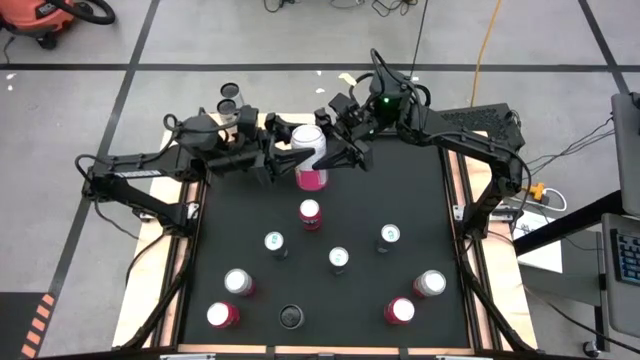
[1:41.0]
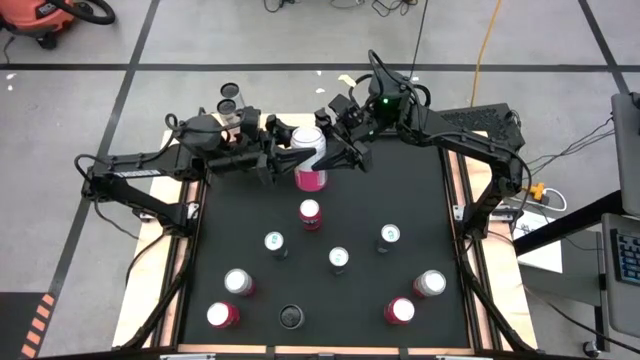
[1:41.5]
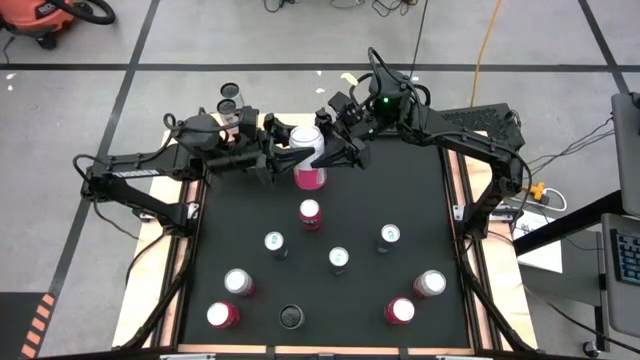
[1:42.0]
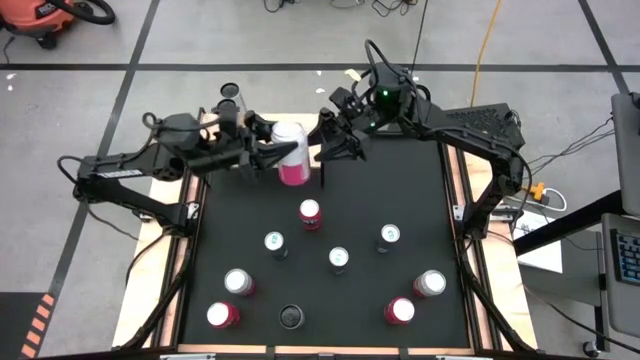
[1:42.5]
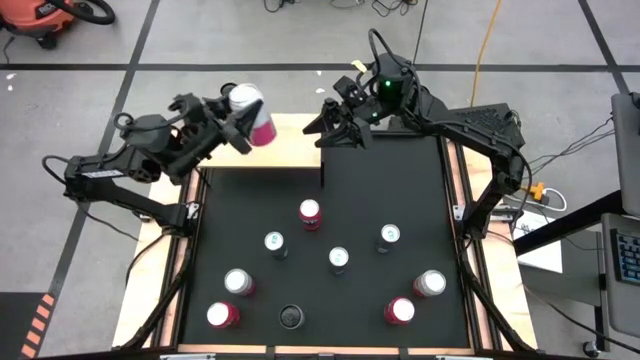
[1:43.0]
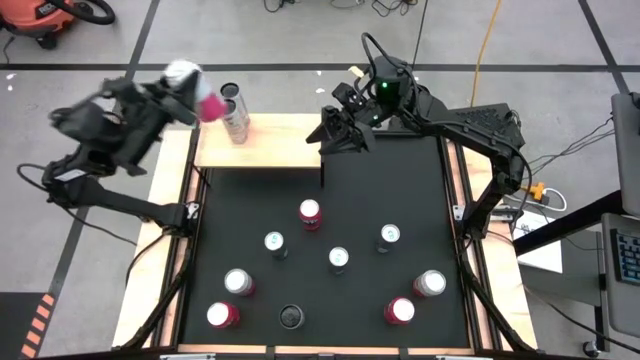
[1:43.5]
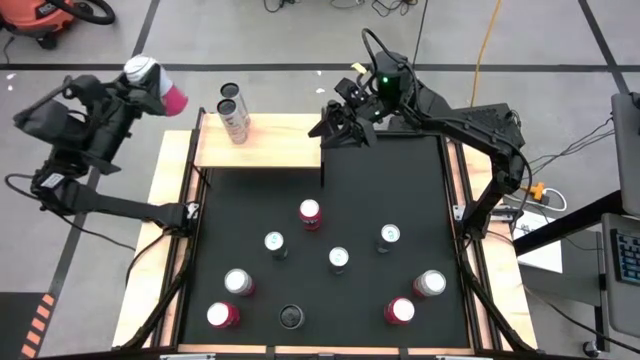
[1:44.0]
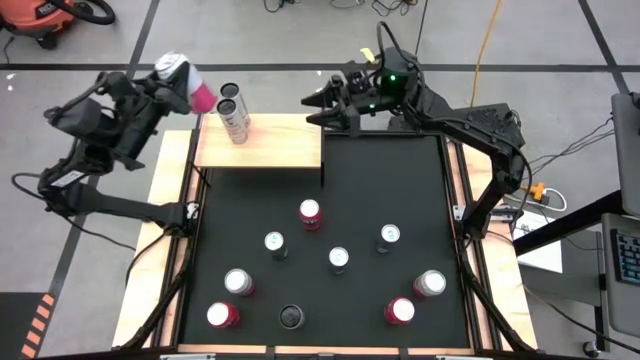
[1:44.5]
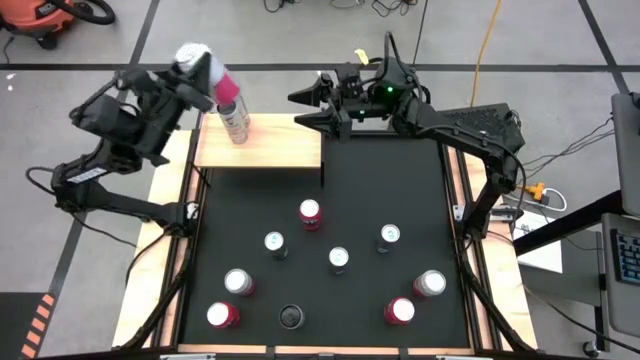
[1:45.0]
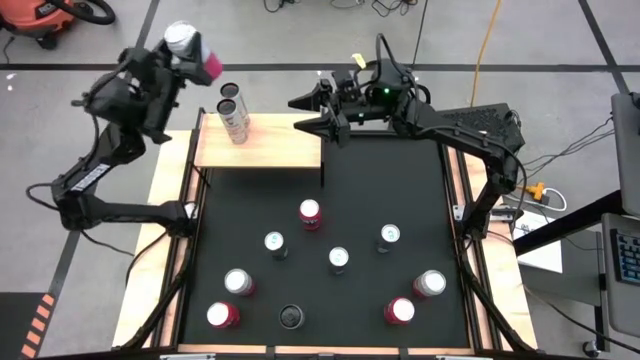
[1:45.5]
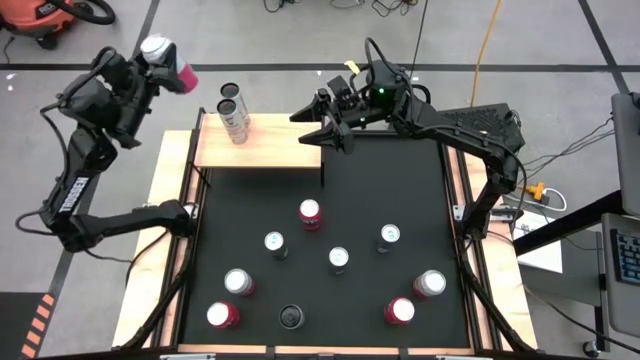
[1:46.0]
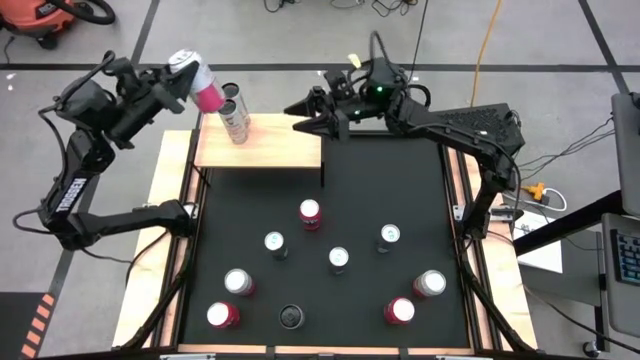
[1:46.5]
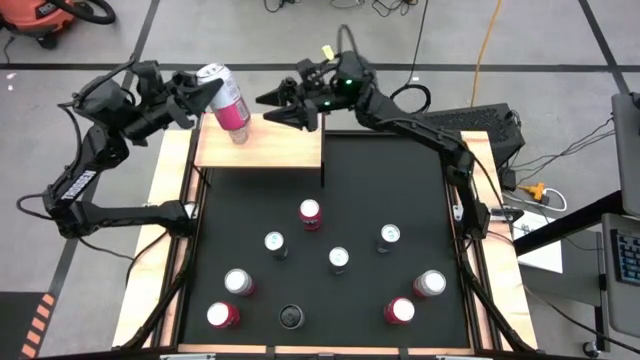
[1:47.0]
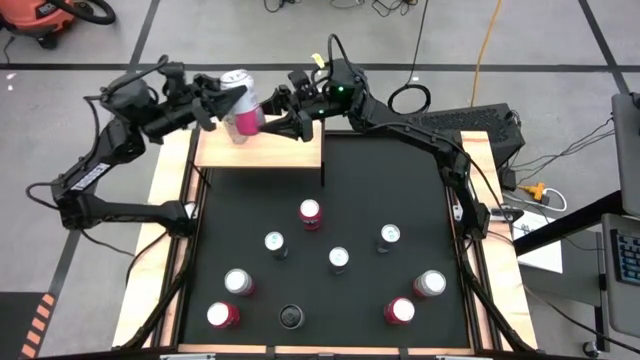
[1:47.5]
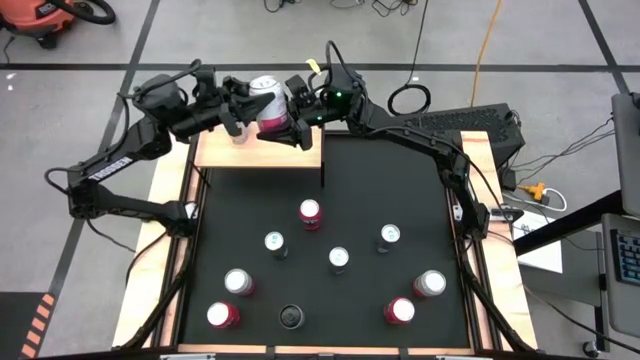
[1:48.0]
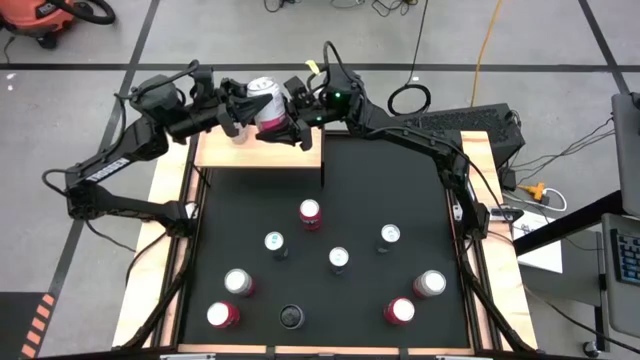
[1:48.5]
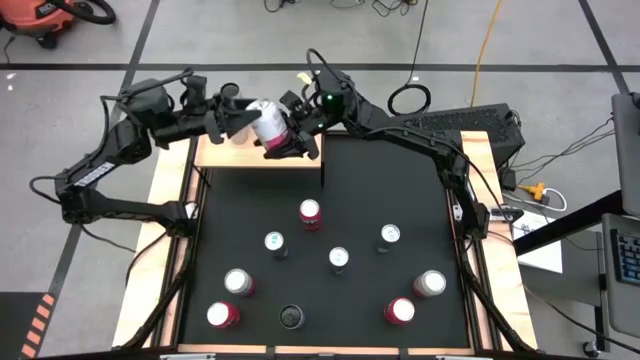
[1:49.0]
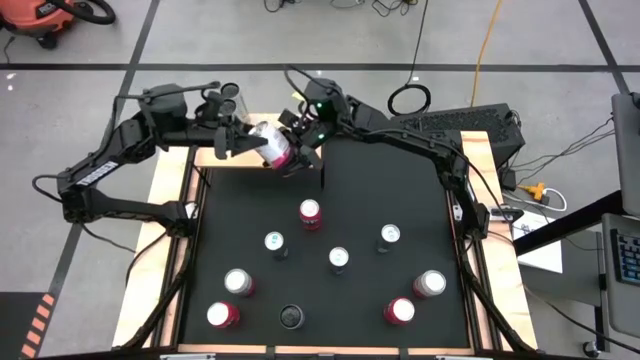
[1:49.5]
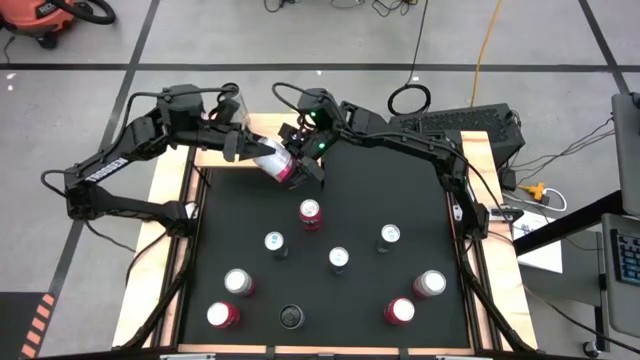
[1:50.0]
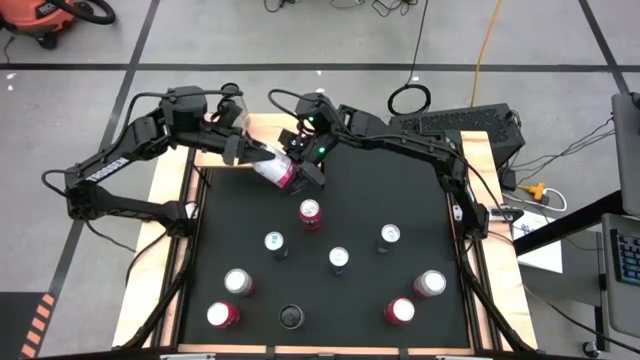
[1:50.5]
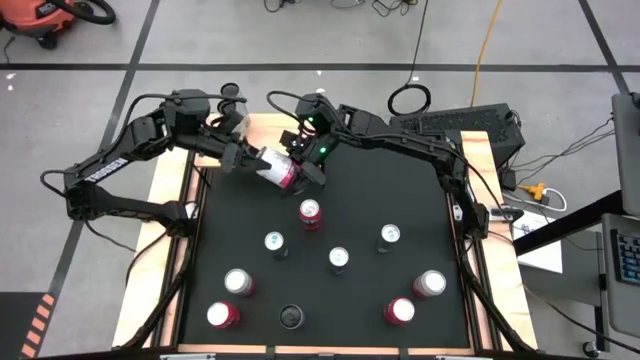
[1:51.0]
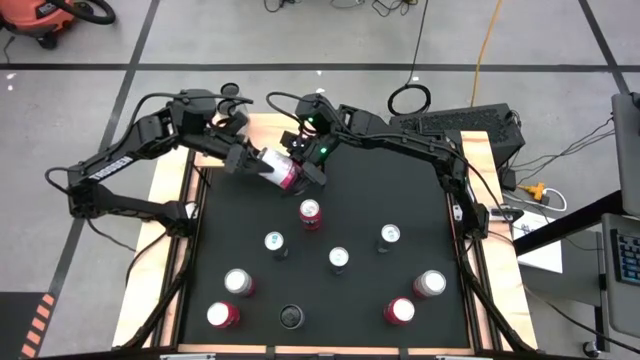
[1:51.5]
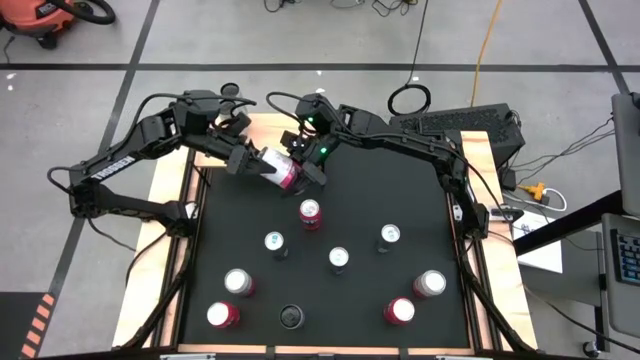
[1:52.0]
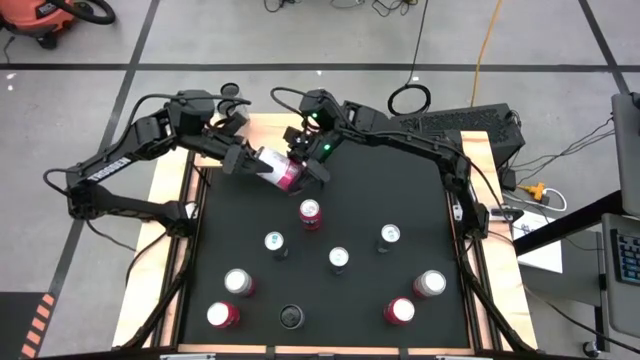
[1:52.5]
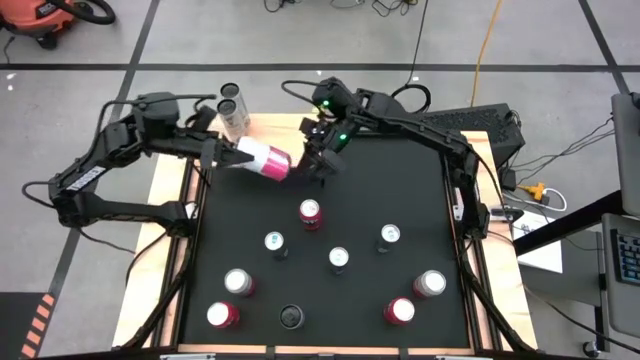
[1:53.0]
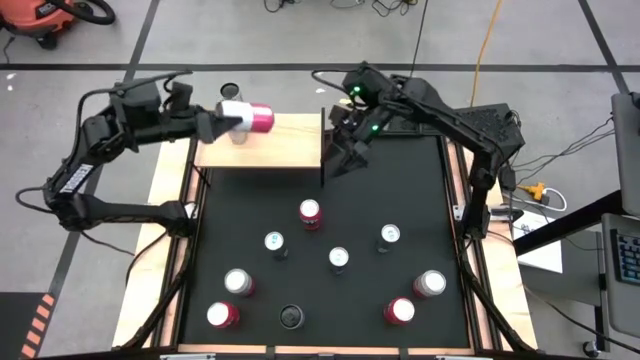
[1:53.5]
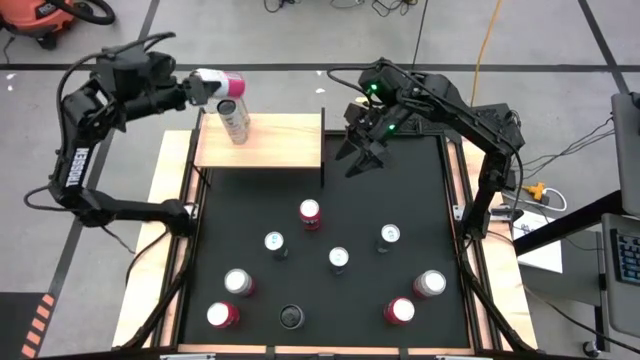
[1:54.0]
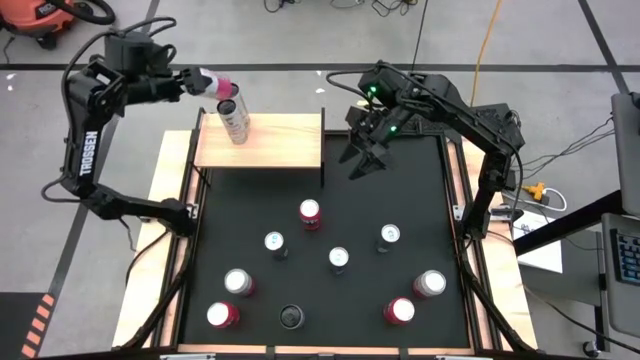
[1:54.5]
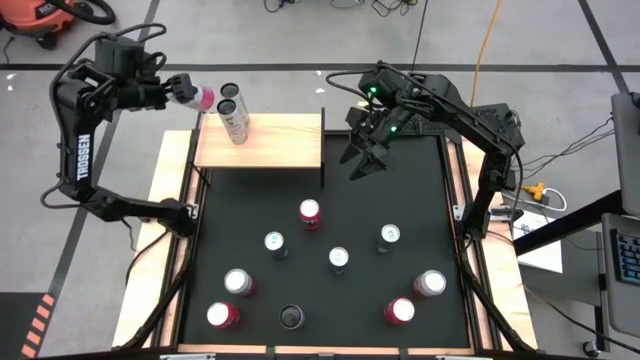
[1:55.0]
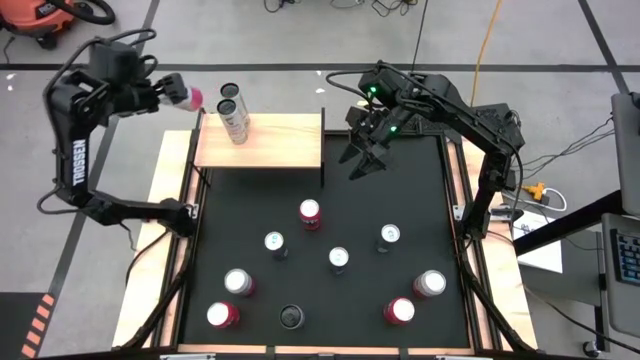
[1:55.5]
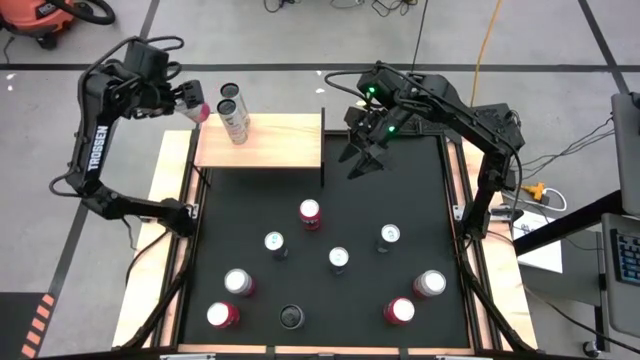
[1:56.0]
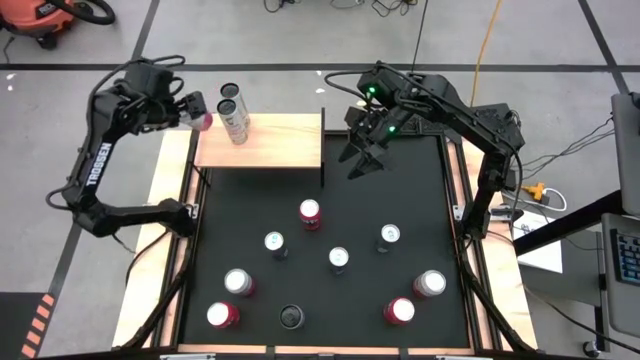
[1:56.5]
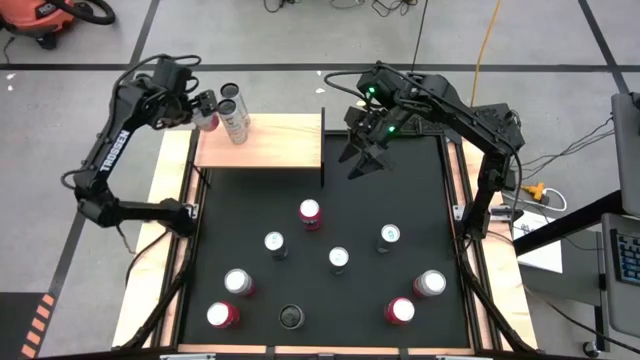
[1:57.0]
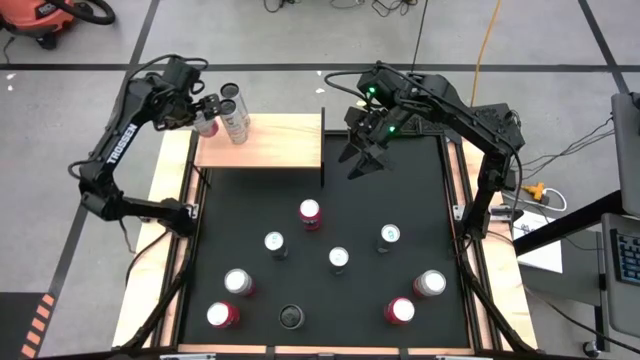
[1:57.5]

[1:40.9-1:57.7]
Task: Place canned beverage on shelf
Put the top pink soda can on the shelf

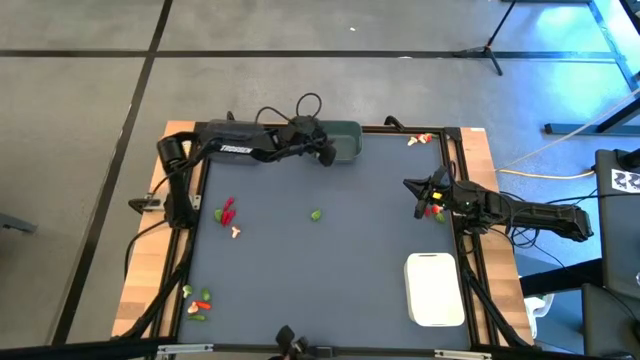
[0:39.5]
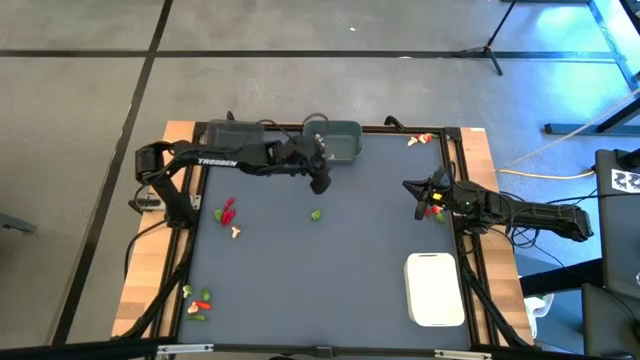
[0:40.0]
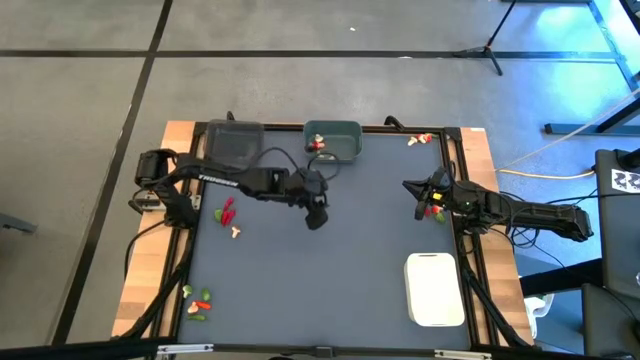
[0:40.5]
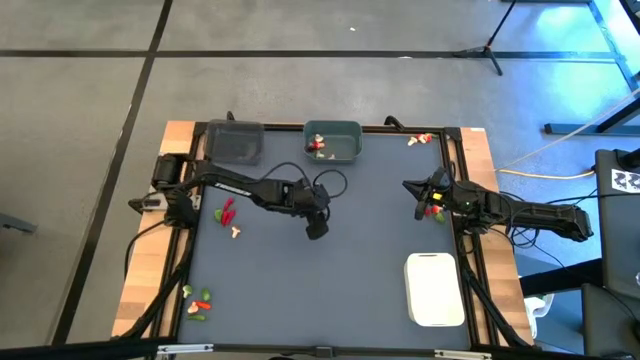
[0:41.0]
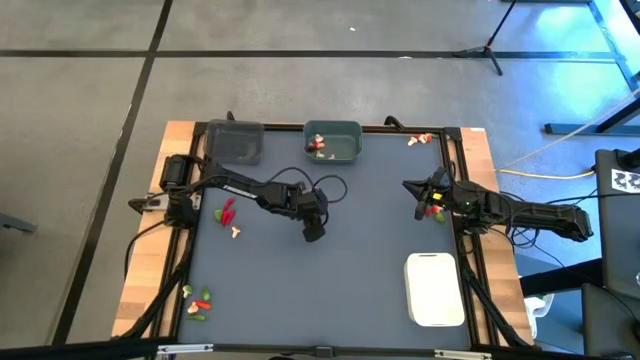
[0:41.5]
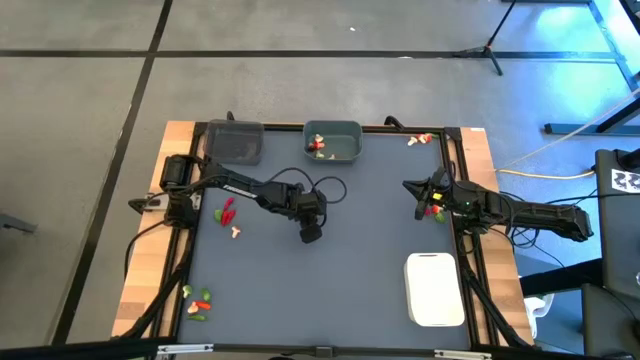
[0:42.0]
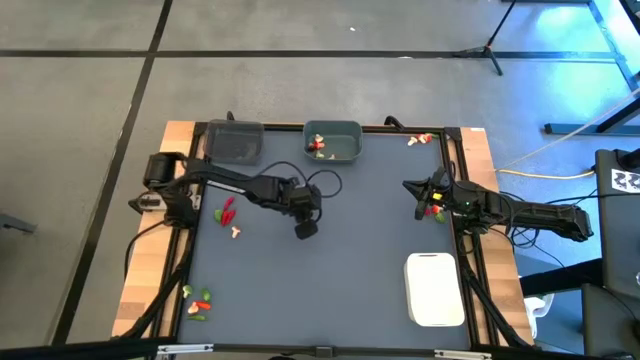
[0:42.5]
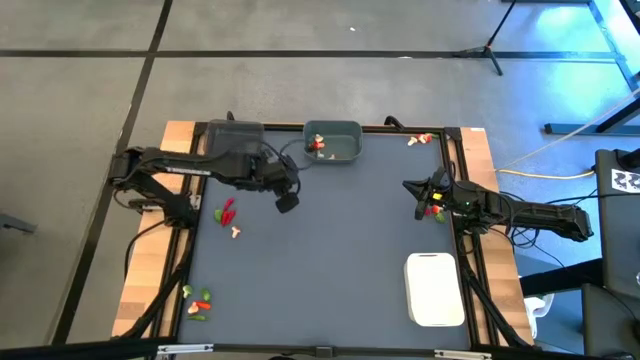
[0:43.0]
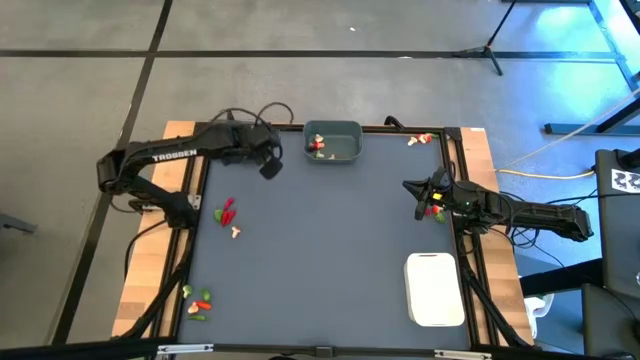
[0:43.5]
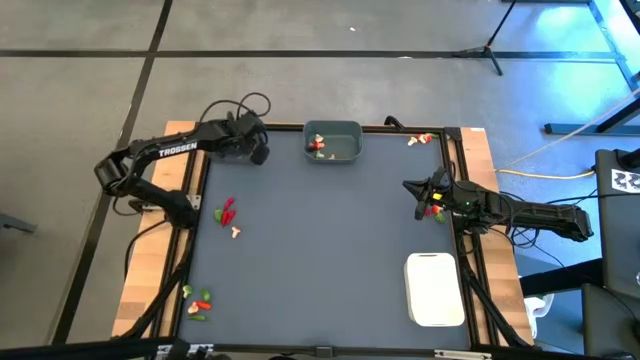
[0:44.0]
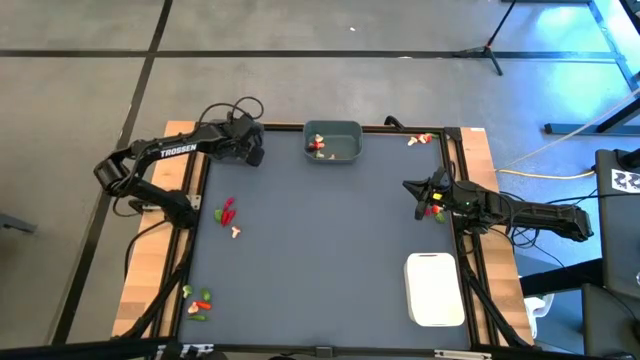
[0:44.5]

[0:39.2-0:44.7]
Task: Sort produce into baskets
Put the green chili pepper into the black bin
